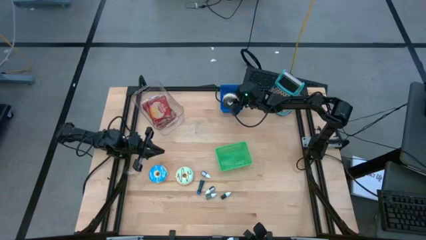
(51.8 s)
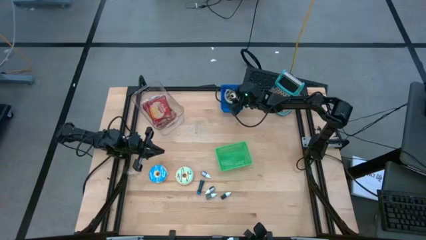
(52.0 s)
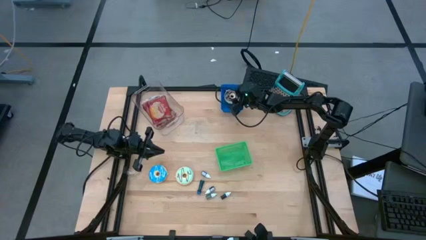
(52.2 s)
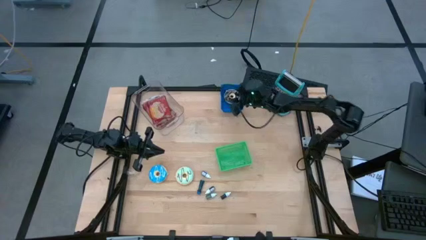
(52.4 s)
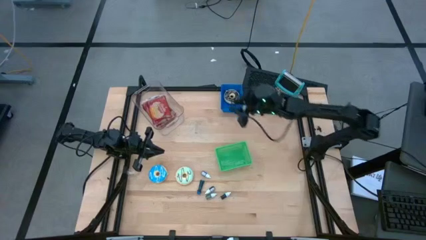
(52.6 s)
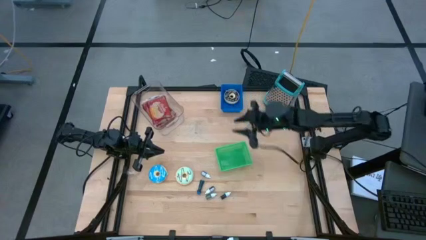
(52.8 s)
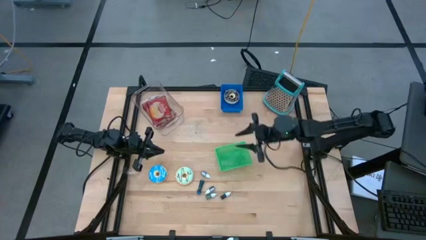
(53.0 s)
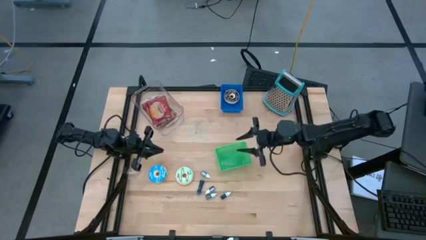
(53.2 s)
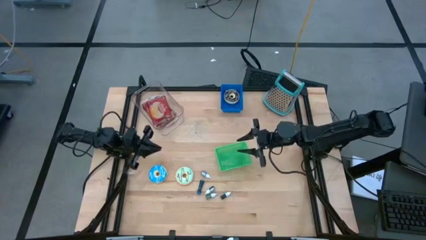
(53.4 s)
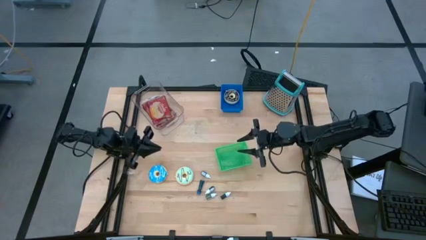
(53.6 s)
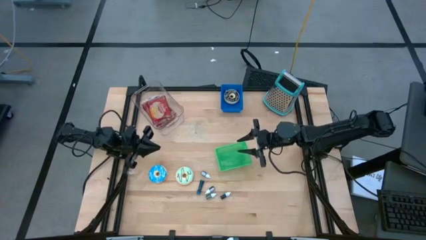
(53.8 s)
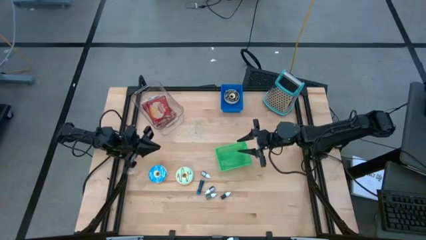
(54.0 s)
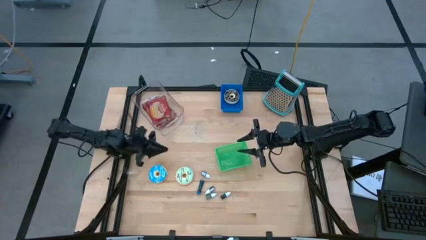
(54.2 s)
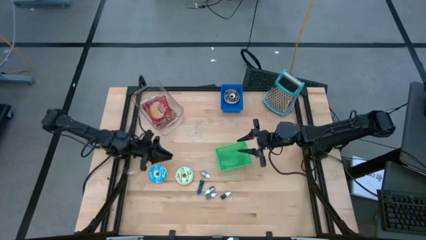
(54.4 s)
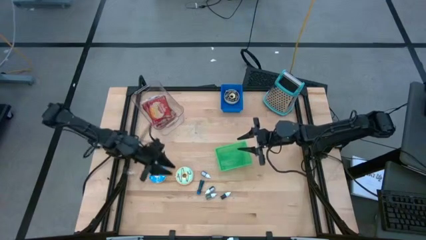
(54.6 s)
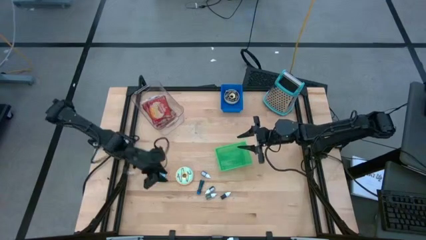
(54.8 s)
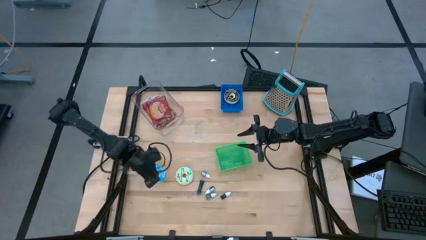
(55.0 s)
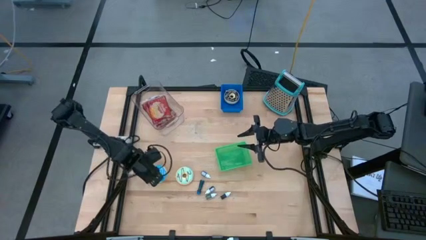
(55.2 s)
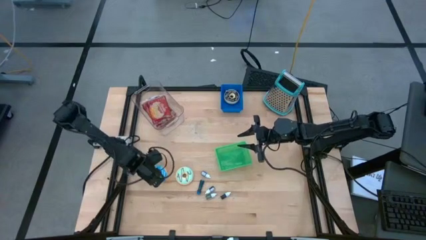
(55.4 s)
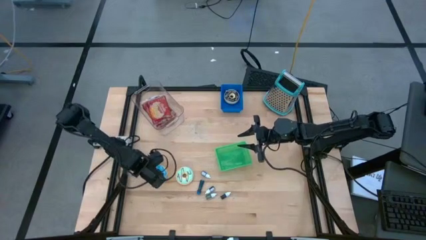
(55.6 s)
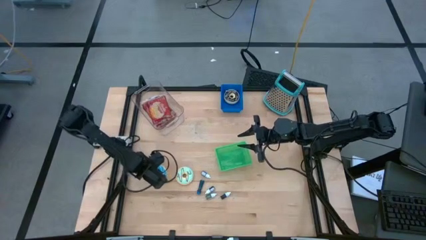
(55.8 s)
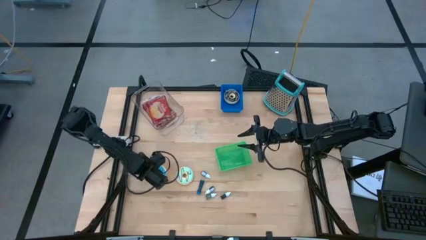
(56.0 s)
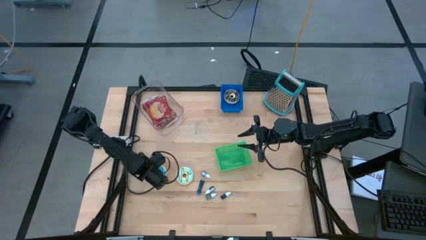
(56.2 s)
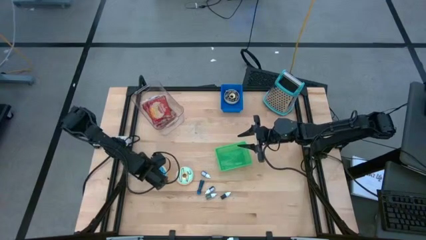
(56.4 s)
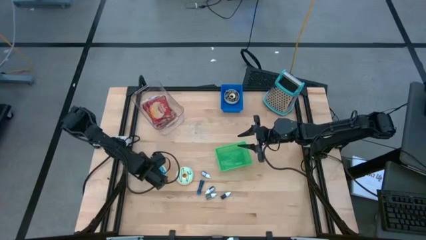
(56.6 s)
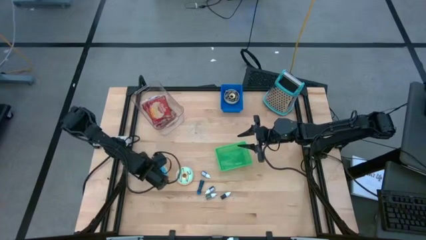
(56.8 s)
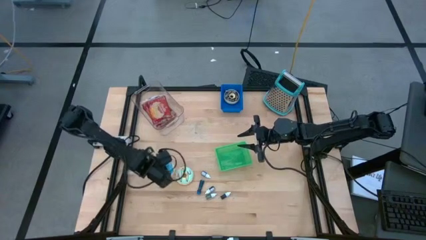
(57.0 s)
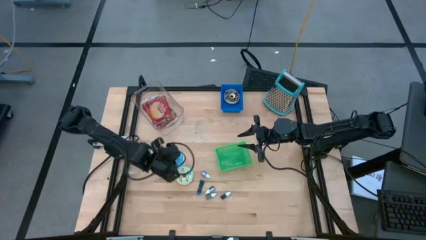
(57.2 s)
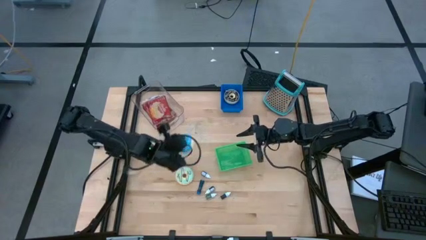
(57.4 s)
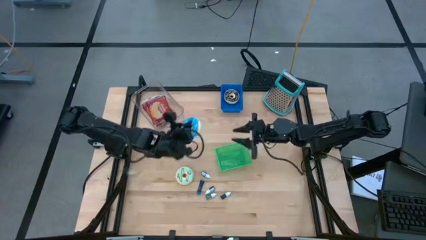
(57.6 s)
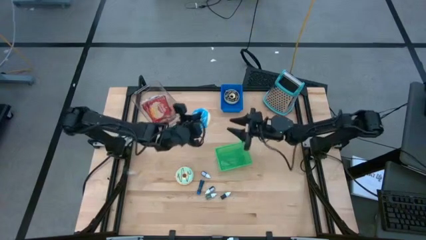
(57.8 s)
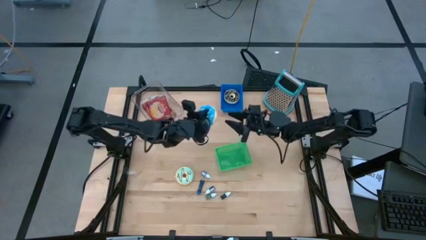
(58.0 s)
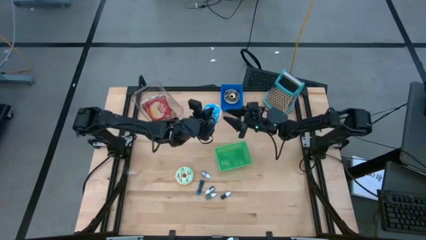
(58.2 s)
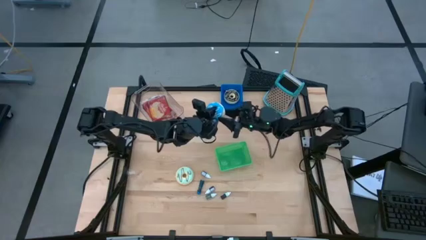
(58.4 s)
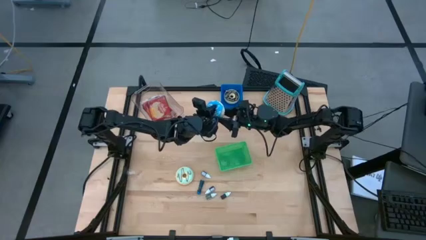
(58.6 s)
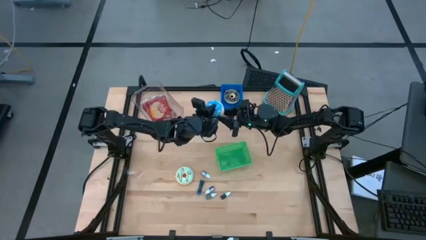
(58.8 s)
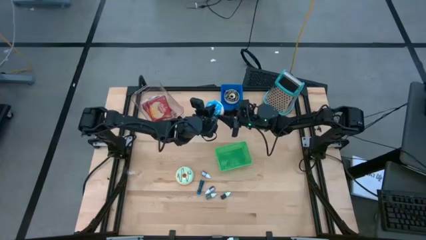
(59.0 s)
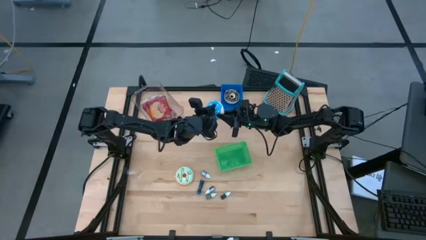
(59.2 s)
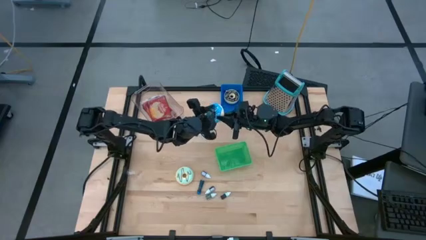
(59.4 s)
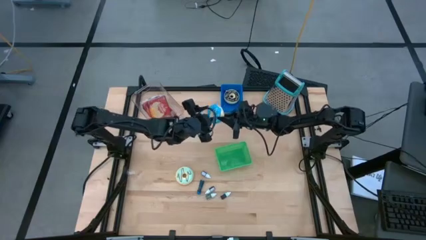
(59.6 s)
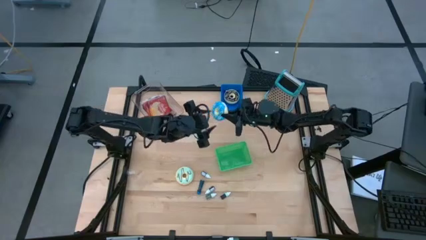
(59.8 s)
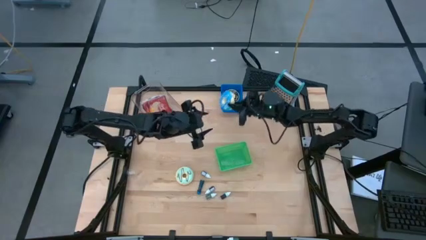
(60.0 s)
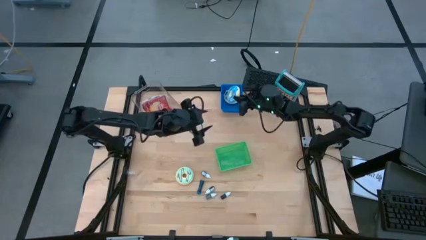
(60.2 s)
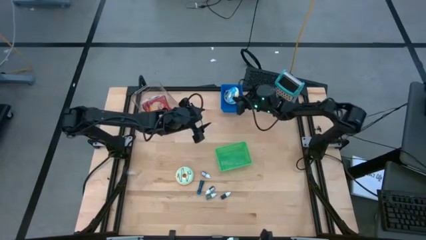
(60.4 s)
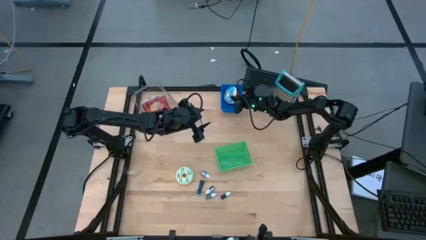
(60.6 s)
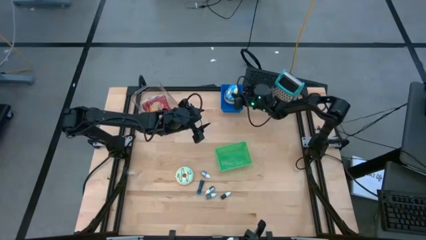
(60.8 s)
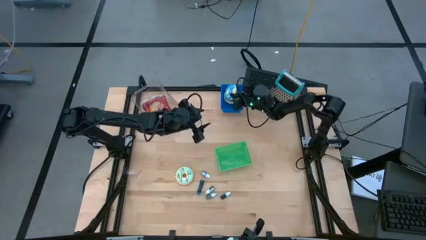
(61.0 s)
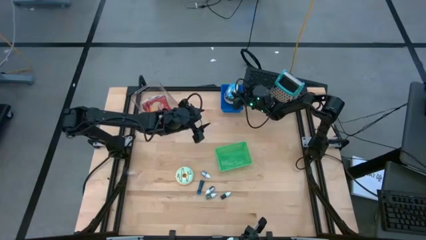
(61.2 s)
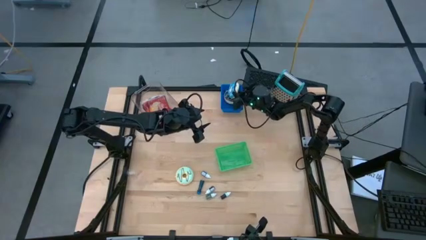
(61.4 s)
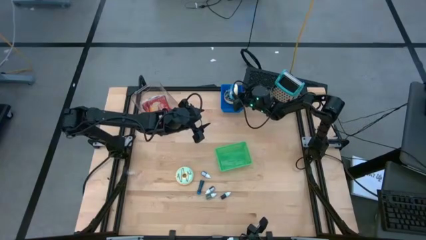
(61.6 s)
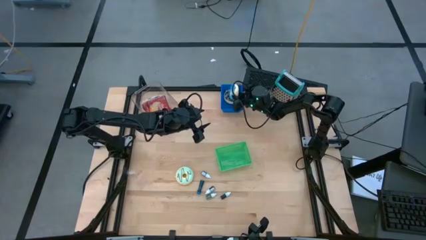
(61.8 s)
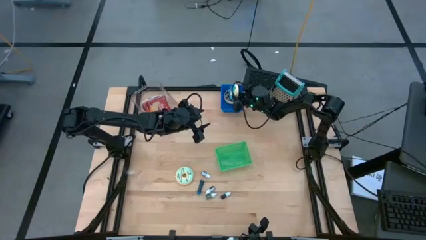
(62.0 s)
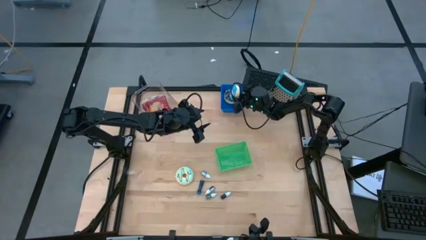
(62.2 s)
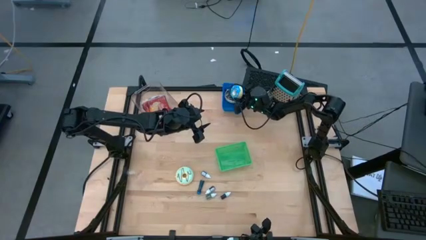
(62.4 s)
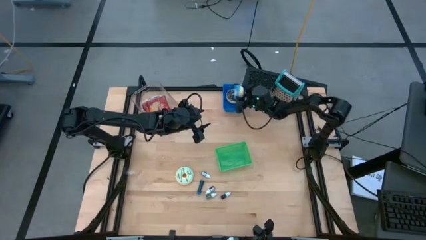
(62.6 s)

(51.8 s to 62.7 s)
Put the blue donut into the blue bin

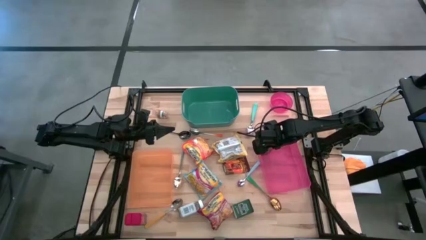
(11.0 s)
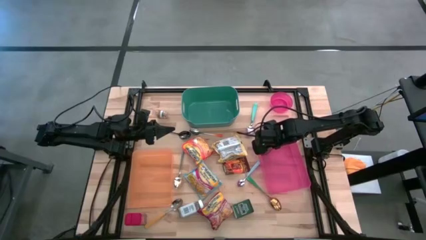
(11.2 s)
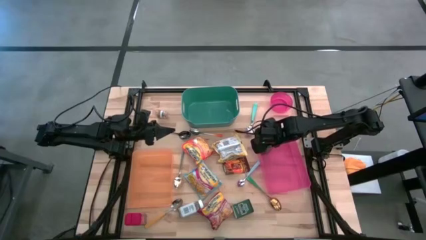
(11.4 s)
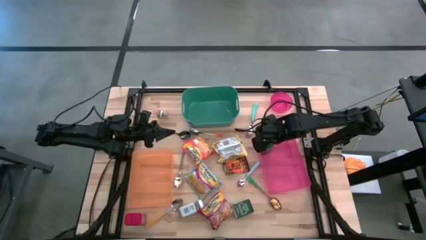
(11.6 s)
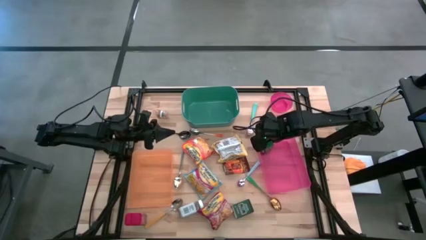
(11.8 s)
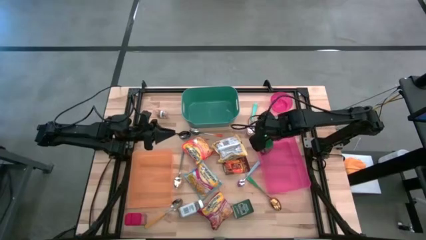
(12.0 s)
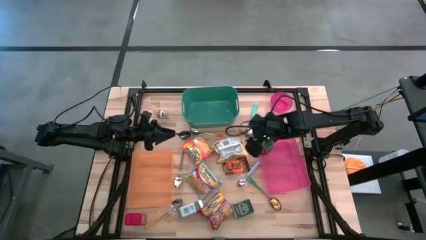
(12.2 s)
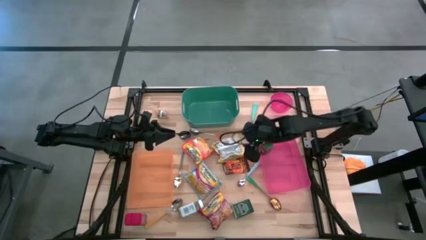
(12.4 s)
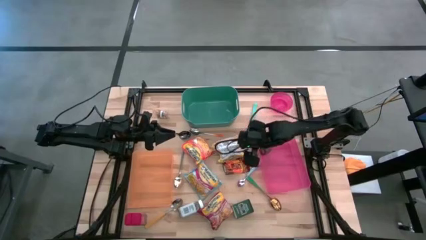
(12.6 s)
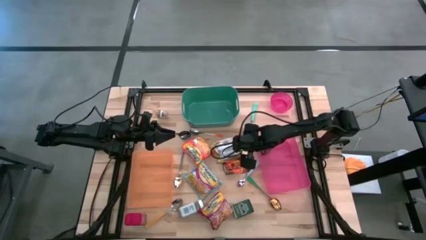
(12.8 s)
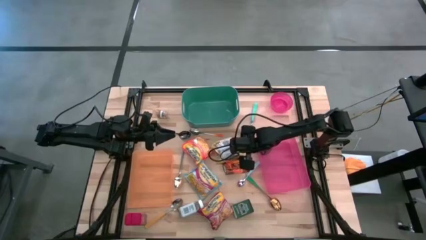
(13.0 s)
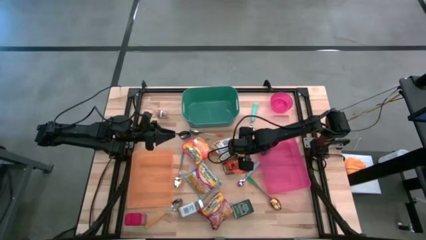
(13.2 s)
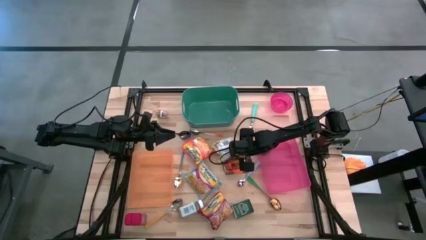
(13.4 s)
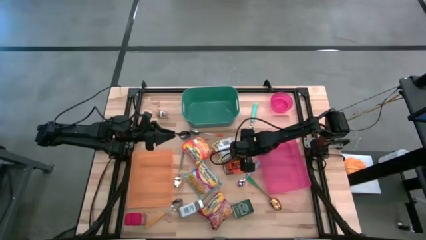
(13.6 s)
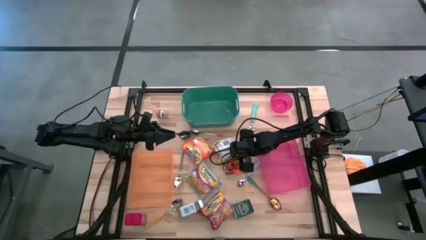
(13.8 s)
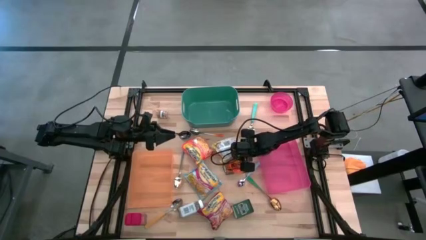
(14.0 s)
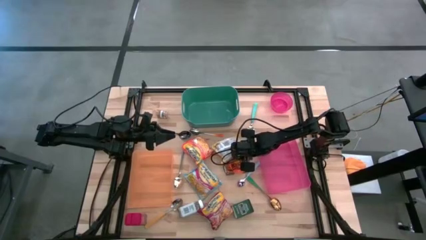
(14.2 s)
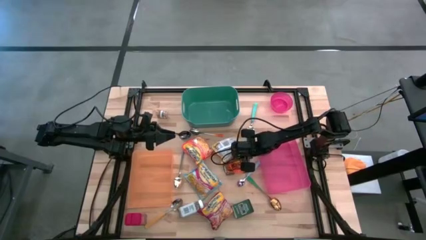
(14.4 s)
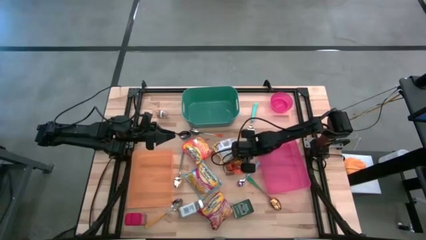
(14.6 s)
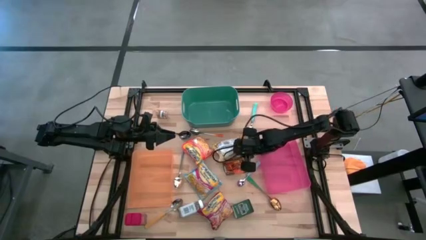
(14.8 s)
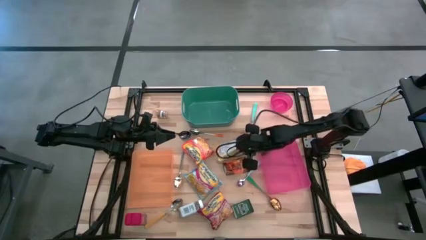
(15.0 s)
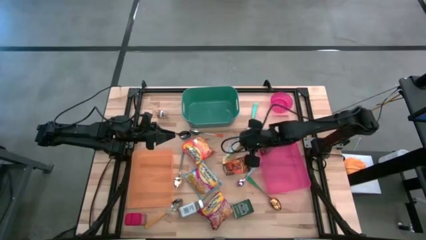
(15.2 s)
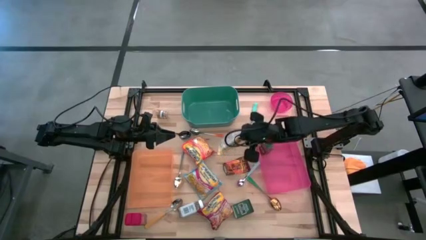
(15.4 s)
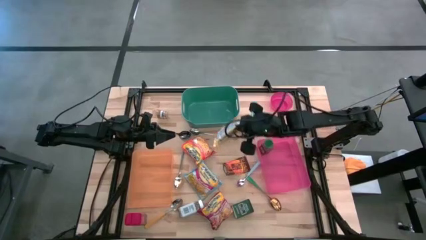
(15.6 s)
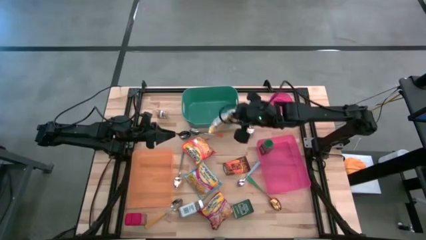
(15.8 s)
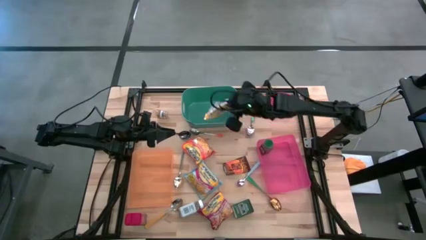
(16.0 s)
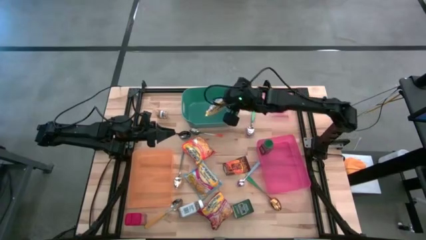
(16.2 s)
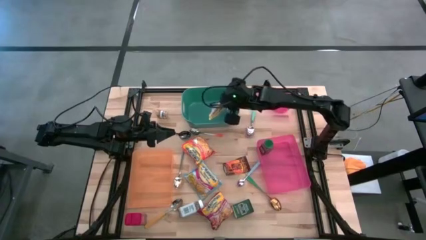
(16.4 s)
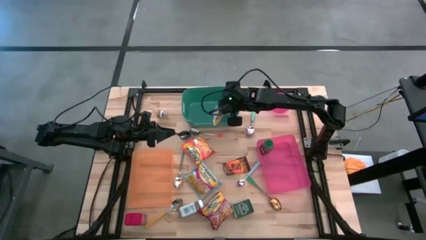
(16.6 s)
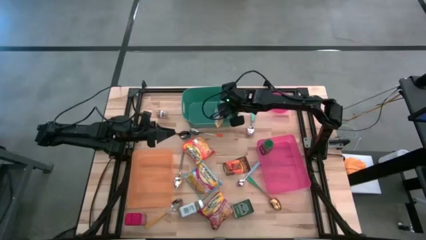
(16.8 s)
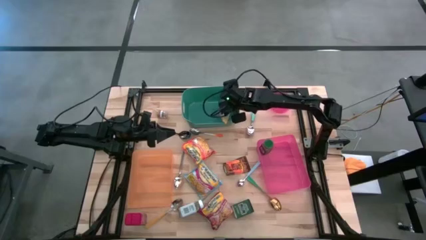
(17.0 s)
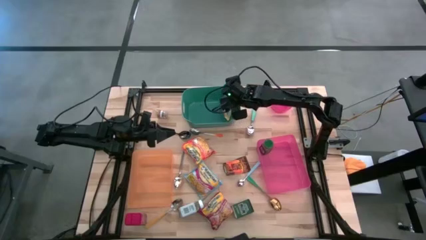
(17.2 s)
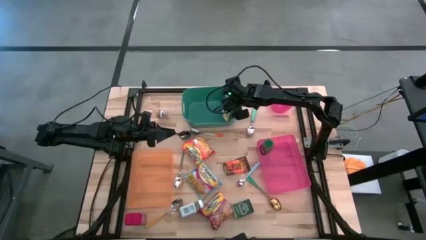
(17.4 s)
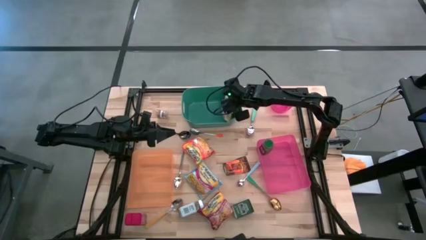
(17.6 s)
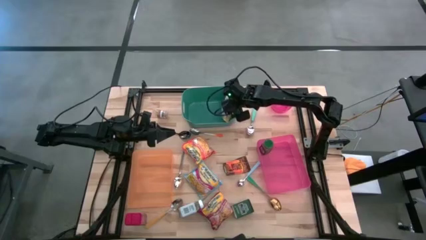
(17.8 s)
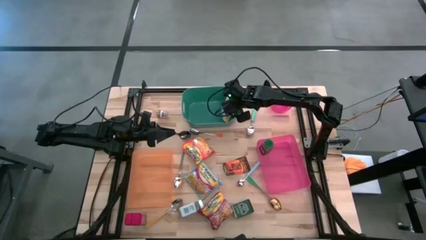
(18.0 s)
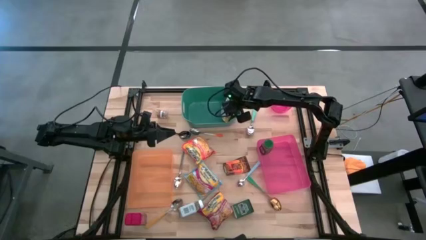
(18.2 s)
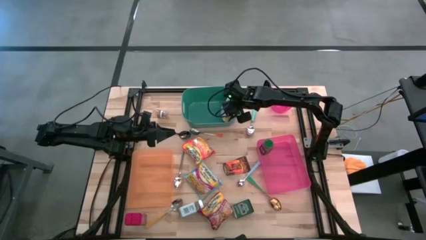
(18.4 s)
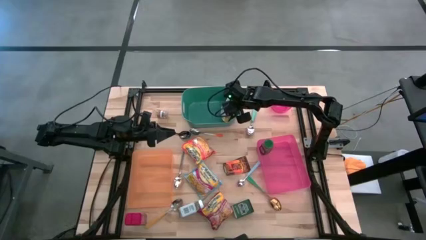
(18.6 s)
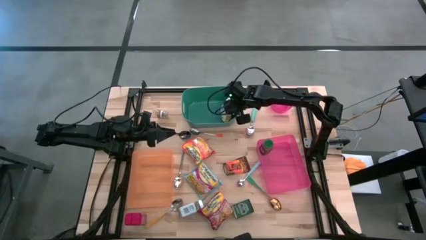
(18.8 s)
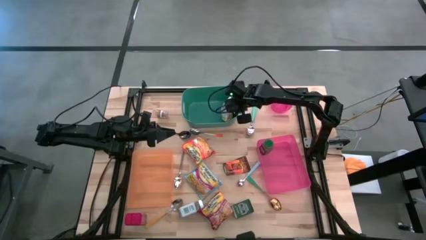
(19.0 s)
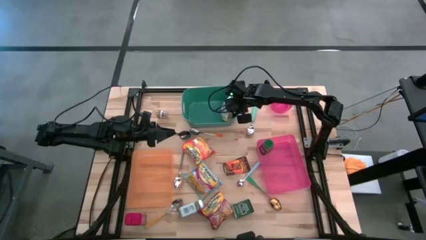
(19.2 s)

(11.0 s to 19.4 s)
Put the yellow noodle pack into the green bin
